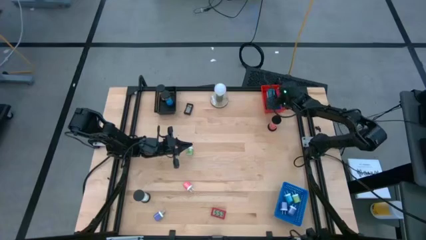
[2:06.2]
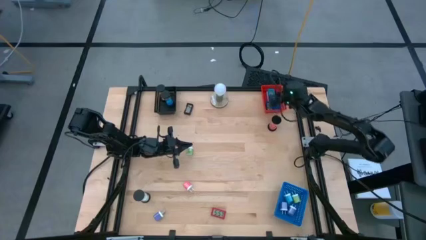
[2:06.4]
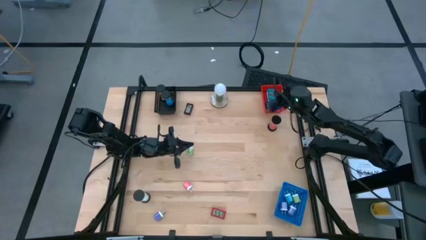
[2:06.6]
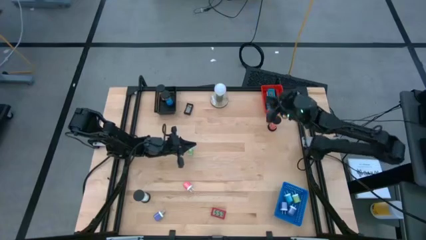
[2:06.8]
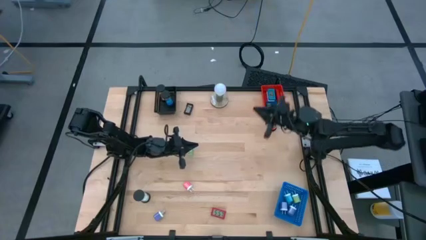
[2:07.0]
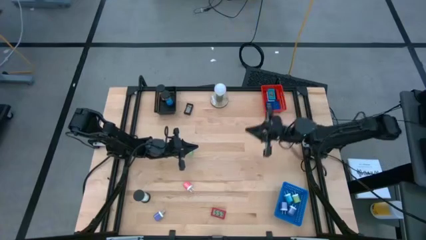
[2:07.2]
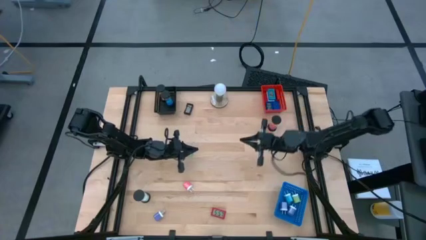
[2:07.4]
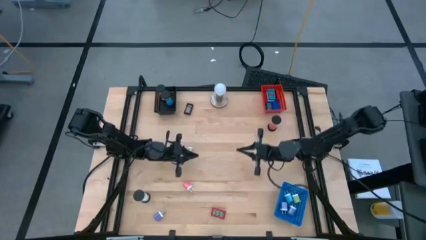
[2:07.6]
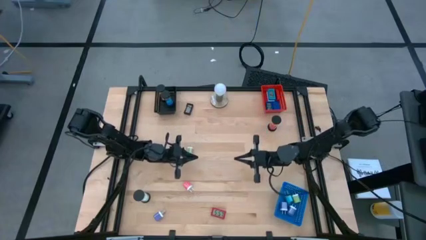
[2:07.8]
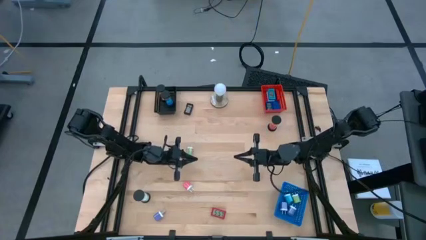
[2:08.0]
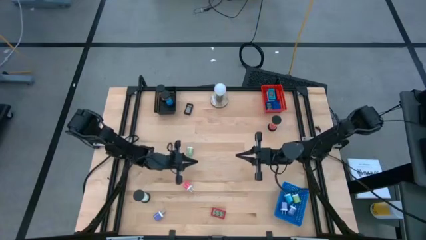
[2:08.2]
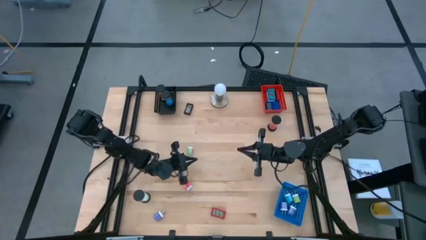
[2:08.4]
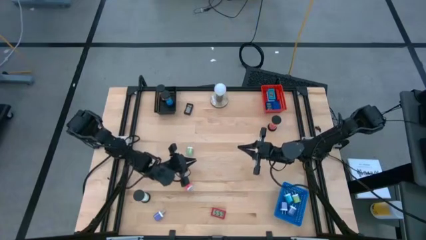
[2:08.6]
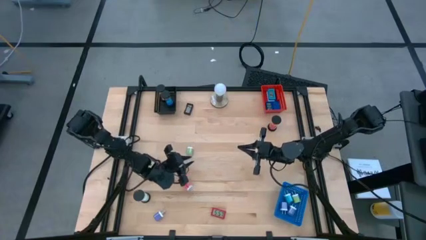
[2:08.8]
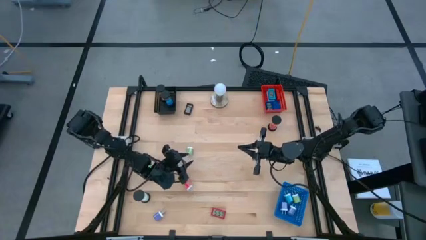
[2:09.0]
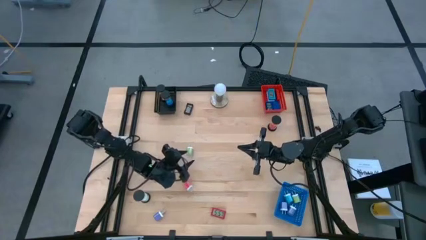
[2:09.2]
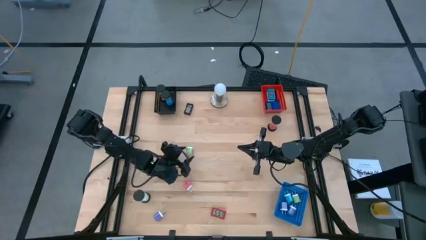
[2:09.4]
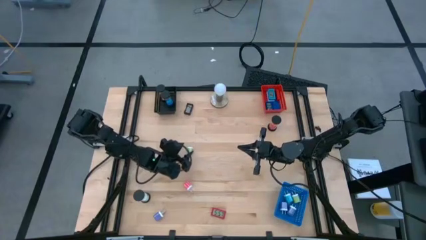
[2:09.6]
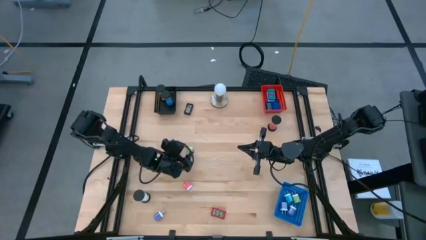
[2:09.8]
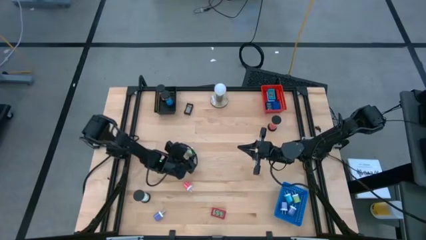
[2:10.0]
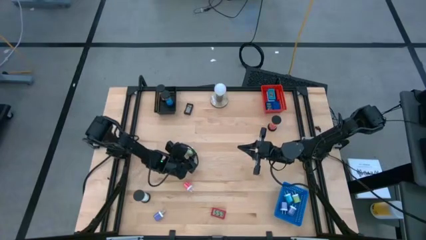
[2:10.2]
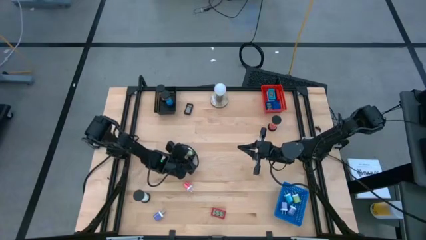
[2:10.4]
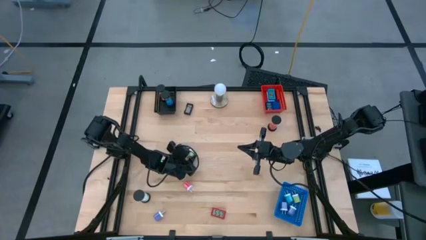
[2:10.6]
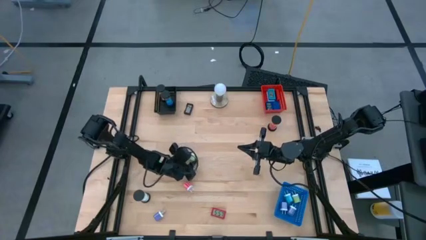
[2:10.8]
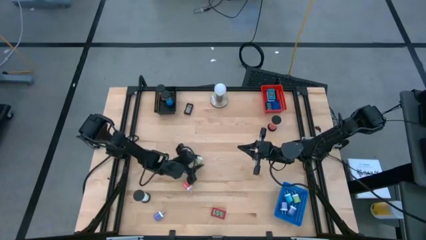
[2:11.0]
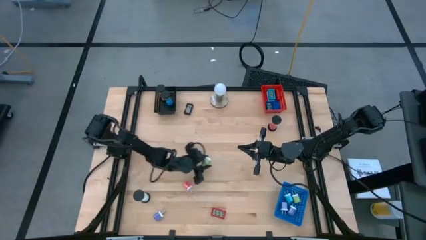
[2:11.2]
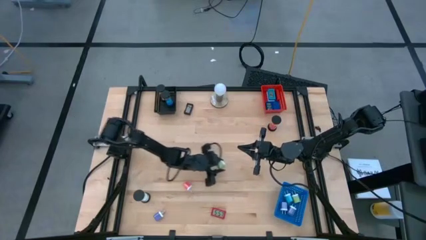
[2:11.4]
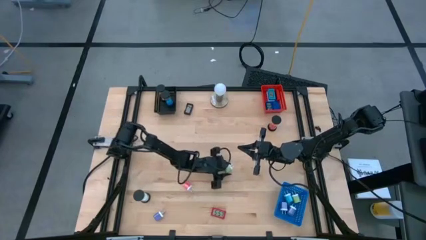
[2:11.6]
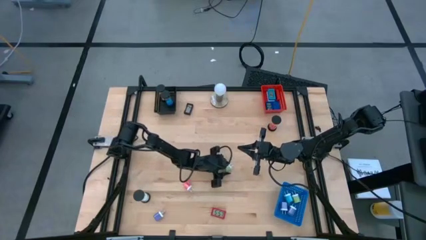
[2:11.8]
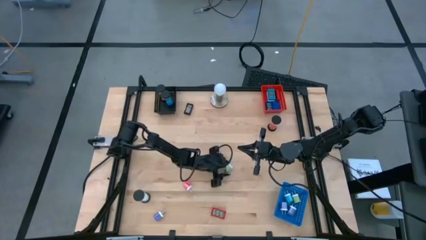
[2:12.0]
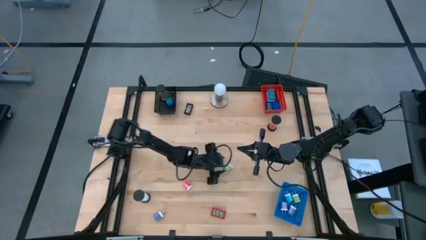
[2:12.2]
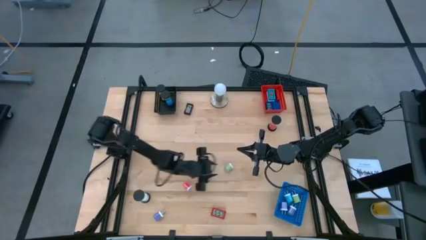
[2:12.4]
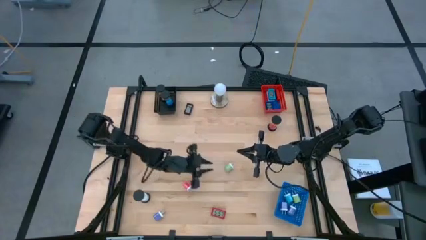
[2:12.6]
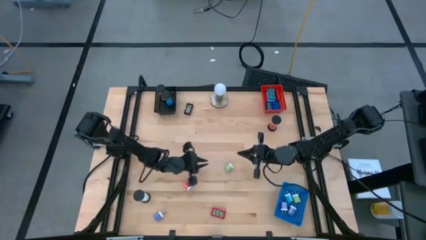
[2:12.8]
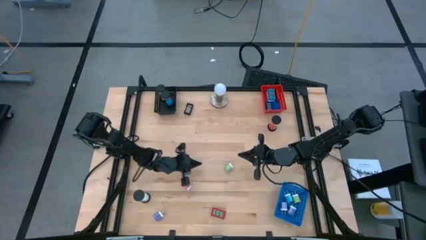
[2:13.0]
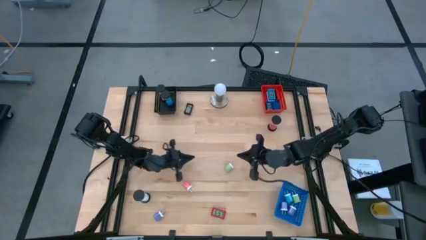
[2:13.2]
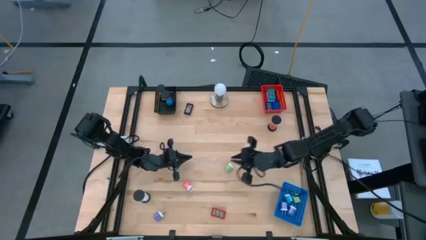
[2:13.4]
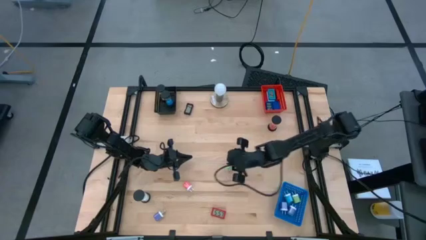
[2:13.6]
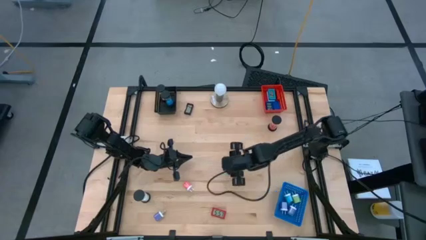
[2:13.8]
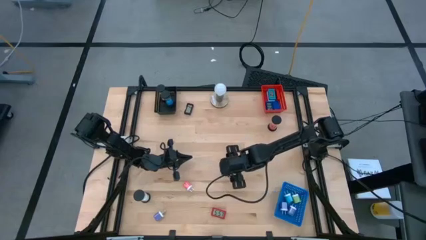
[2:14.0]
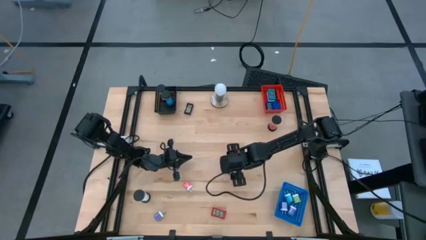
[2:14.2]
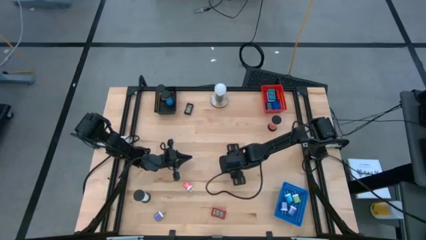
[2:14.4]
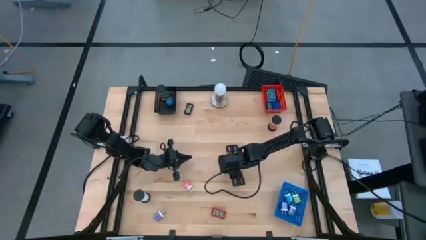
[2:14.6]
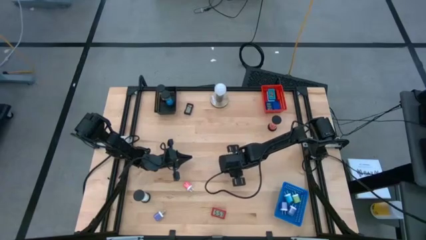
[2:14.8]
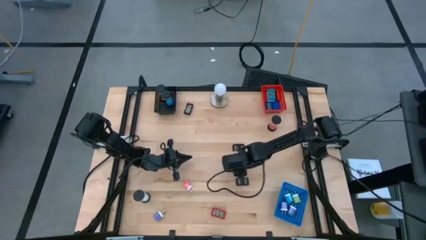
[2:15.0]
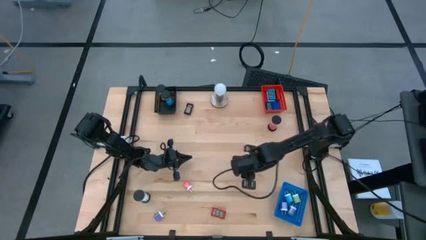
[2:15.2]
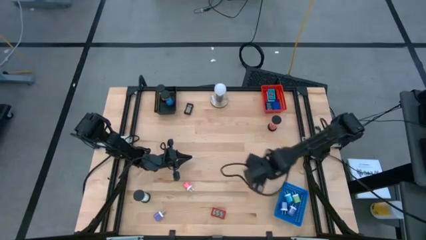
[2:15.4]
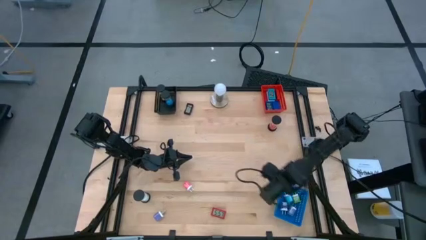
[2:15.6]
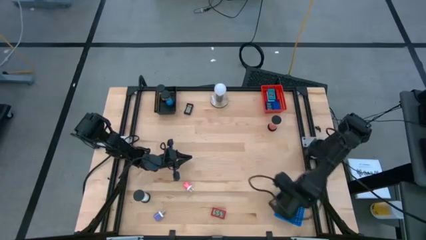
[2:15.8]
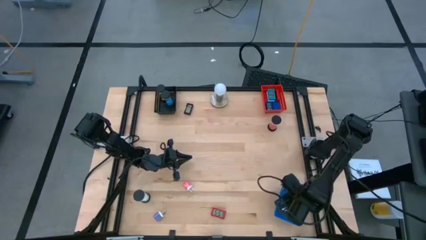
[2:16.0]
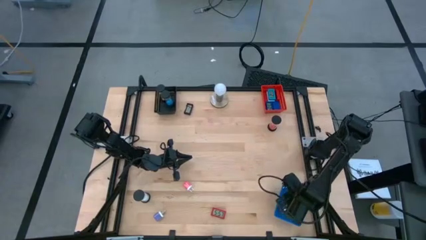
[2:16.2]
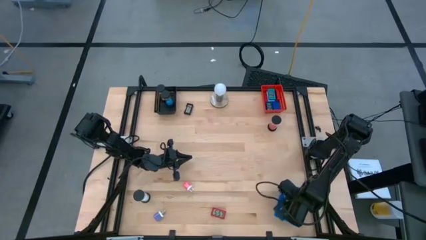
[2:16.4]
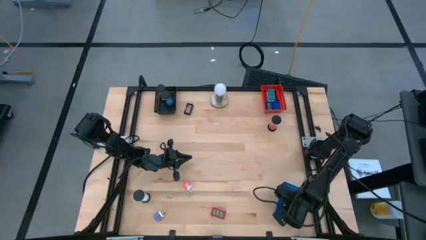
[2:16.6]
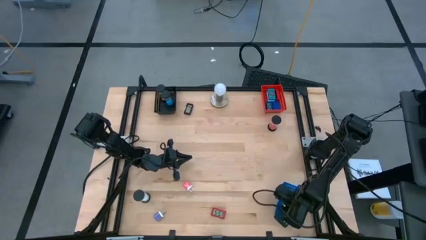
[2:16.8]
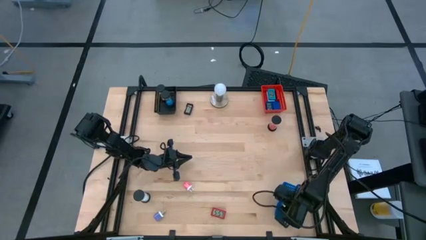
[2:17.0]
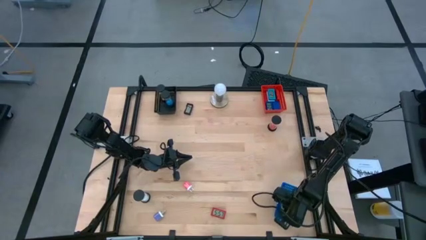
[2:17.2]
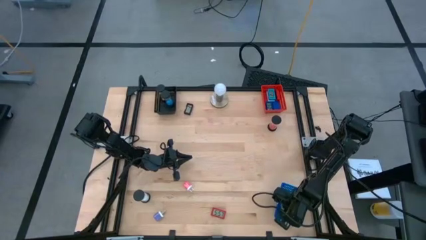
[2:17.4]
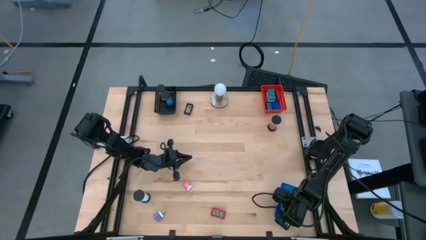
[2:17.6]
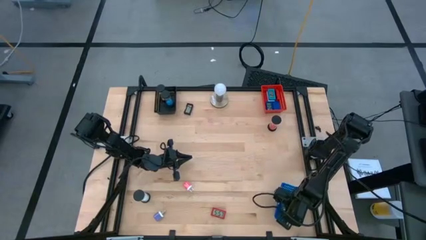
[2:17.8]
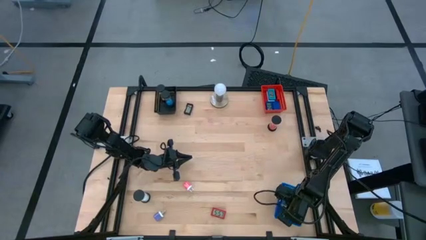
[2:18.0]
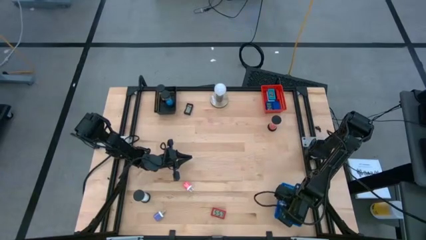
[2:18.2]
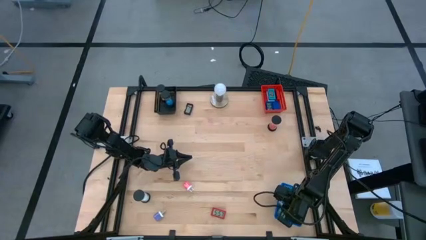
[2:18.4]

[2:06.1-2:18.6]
Task: Pick & Place Office items
Put the green charger adapter into the blue bin
